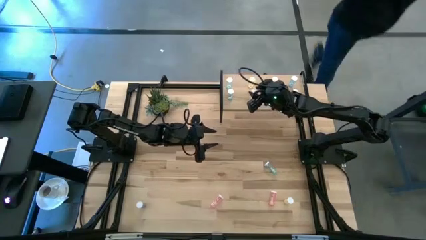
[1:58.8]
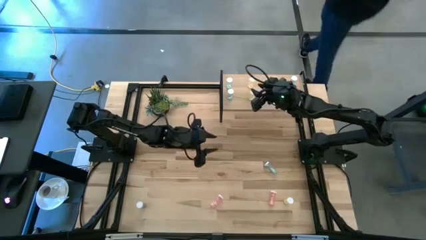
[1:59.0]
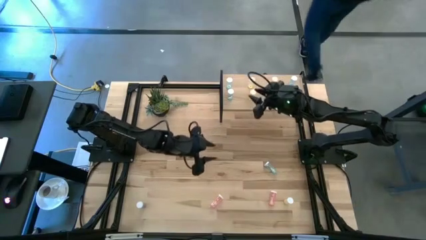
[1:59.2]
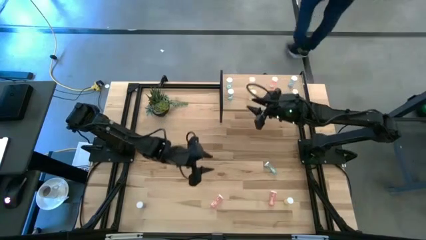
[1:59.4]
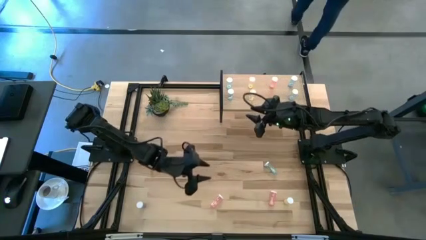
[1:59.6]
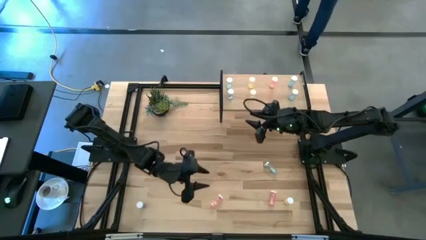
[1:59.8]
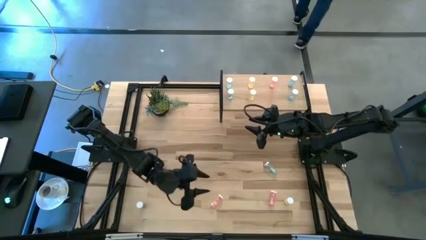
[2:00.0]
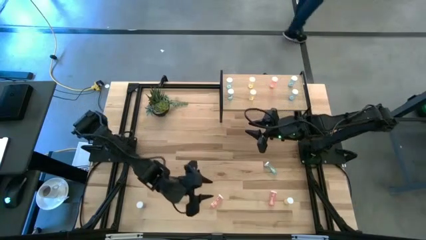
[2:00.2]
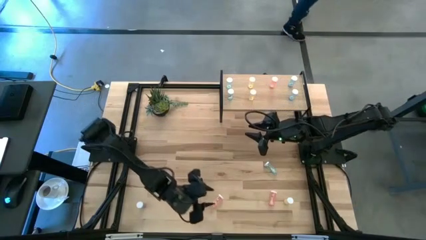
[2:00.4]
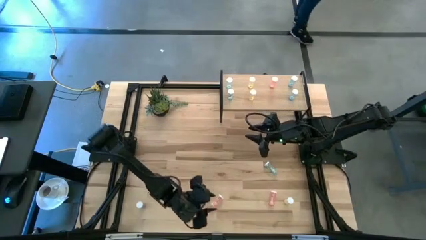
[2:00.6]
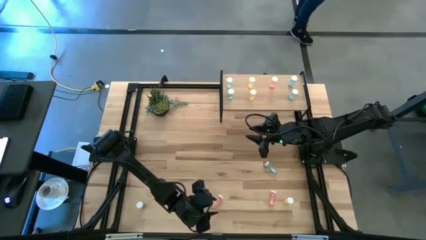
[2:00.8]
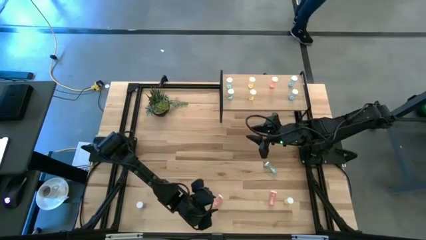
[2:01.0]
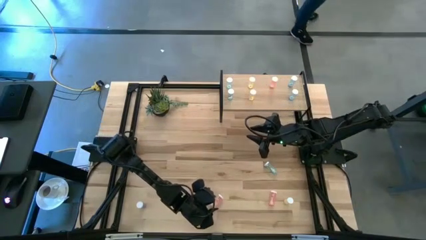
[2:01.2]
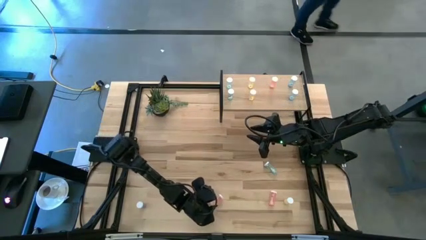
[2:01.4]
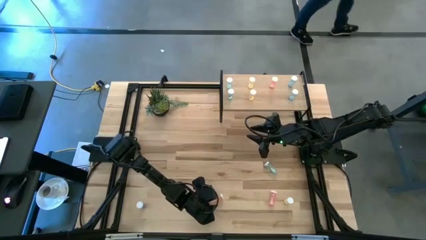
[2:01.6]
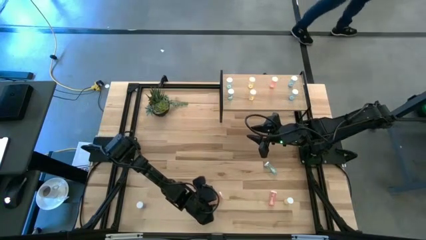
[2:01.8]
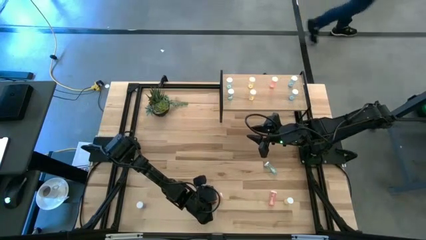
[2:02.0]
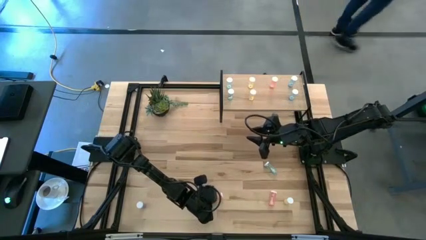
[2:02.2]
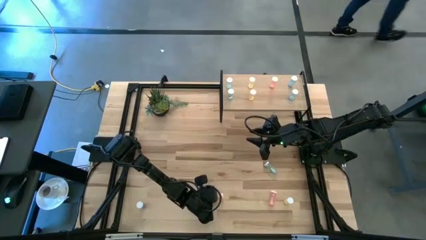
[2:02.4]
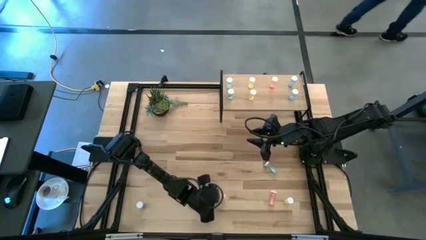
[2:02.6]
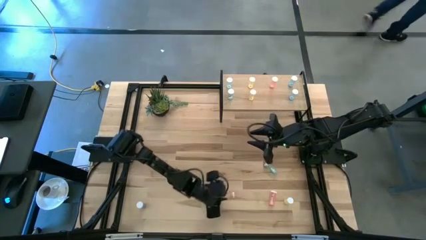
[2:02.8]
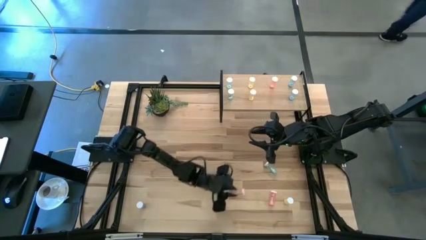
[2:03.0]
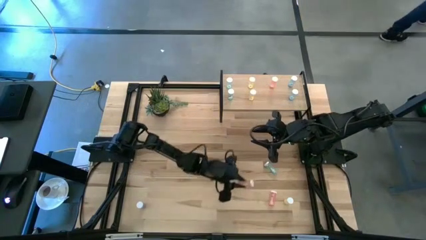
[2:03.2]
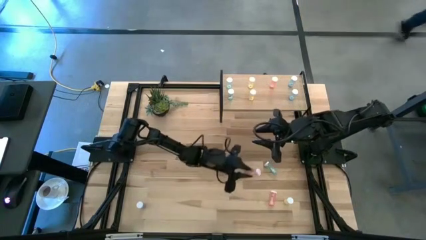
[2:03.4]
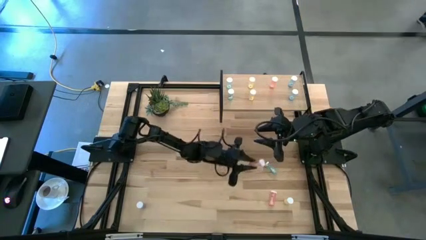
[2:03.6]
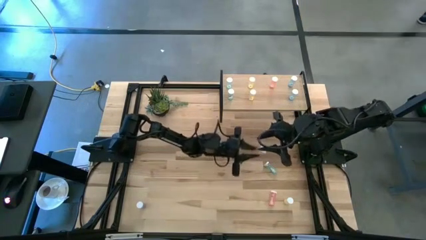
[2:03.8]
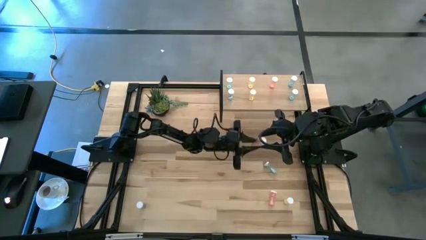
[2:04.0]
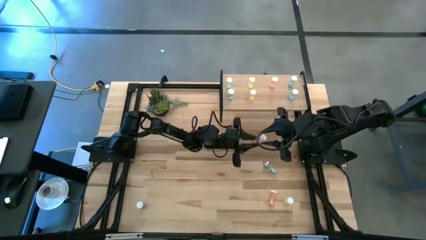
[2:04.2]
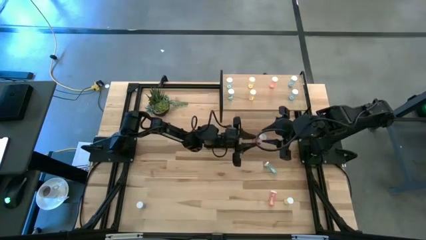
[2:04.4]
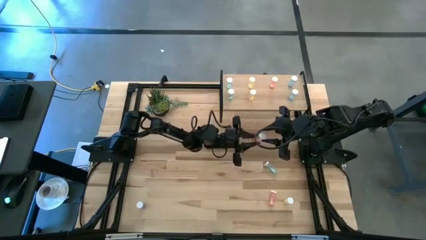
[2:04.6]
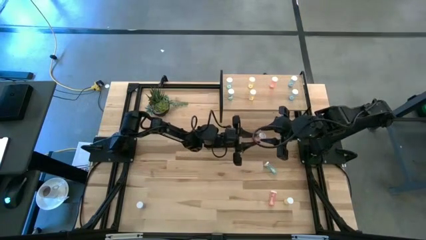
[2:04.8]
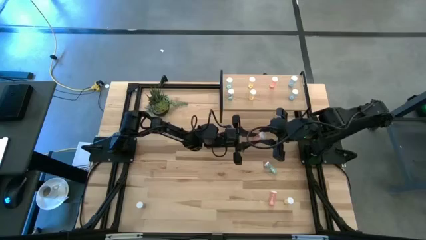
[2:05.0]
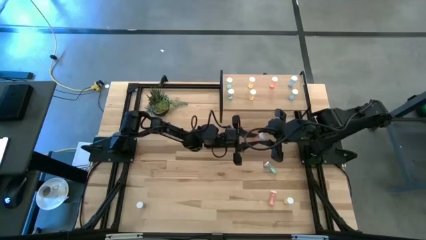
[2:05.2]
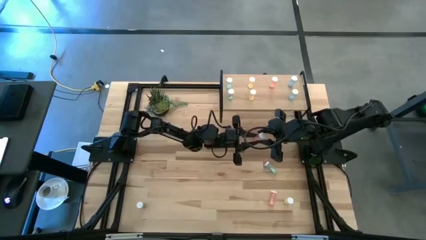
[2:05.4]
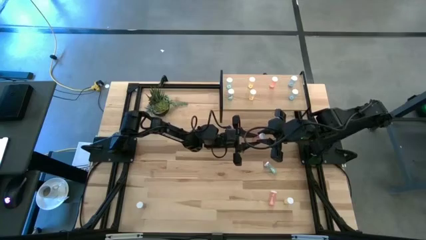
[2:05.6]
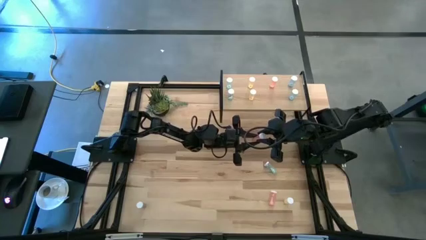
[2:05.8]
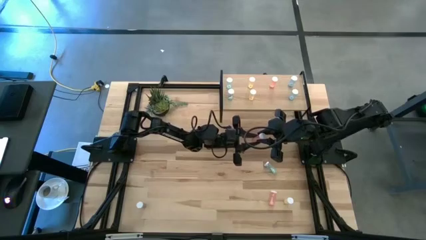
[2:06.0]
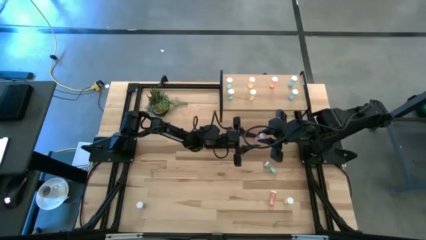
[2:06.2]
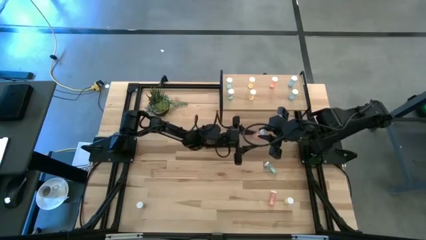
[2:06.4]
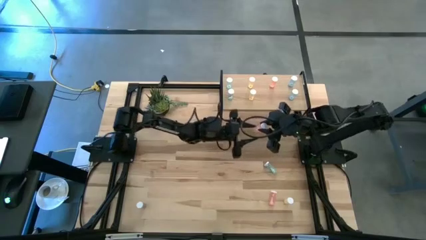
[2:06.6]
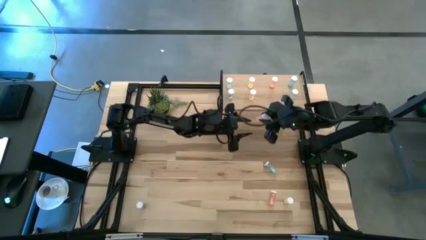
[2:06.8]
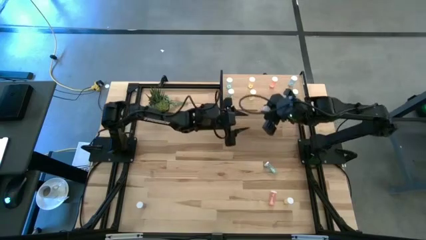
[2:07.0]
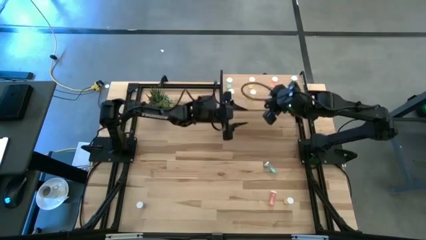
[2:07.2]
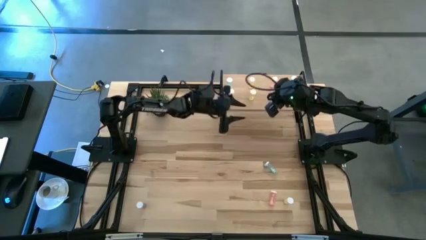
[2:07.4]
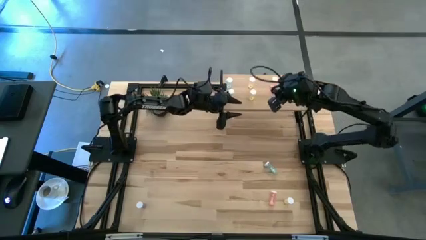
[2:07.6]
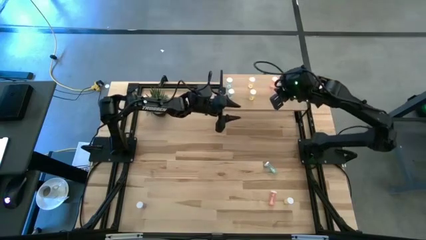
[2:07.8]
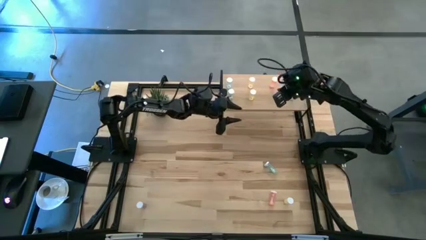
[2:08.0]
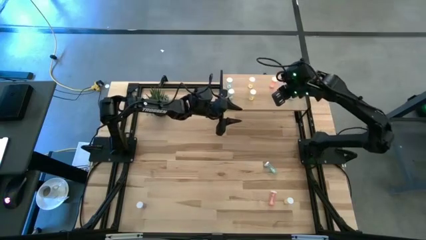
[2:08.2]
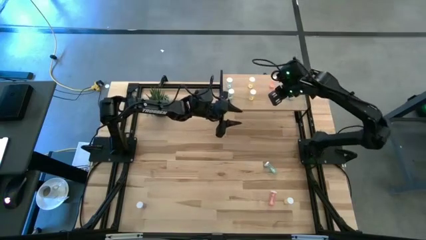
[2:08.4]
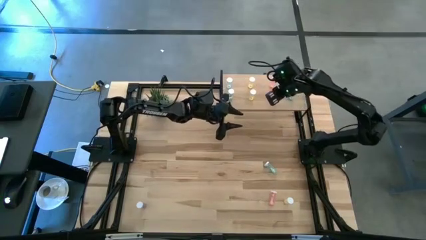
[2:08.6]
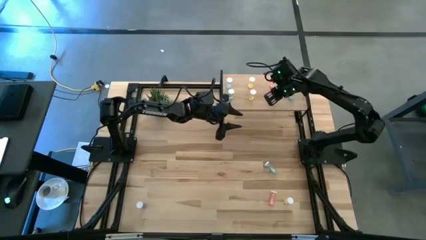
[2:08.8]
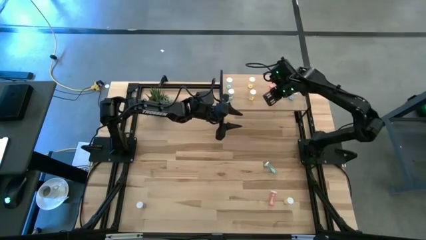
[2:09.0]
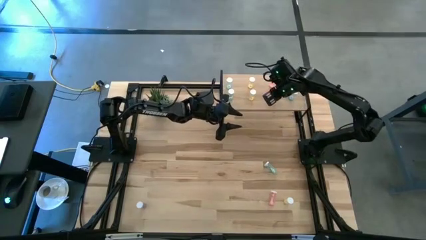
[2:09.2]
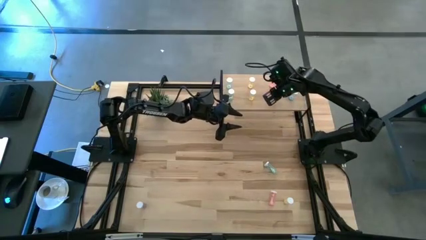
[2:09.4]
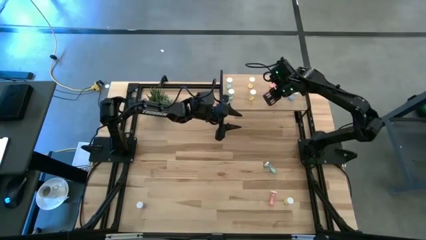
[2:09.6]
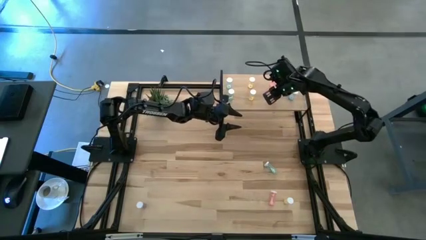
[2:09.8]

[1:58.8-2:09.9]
Task: Pick and place medicine bottles onto shelf by color
Put the pink pill bottle aligned with the other pink pill bottle on the shelf

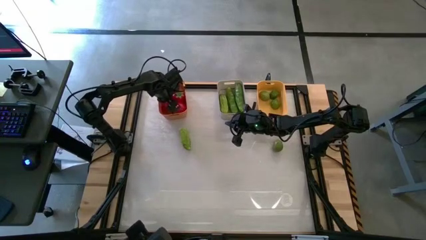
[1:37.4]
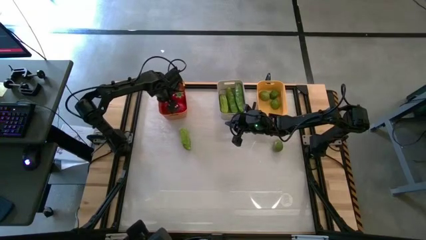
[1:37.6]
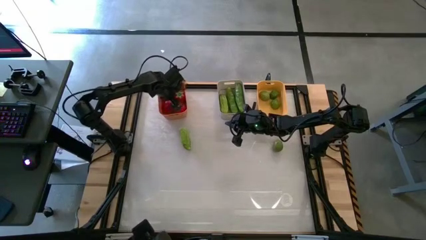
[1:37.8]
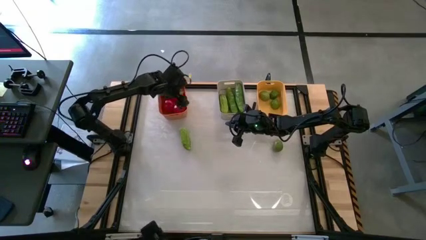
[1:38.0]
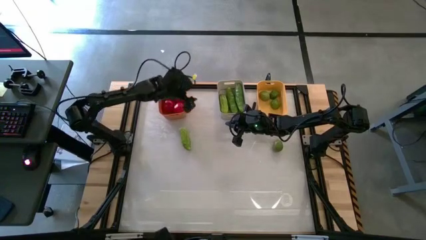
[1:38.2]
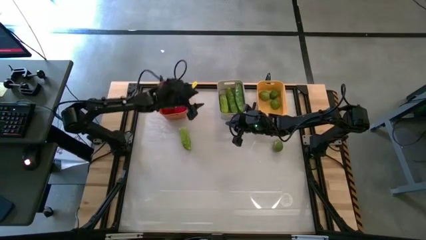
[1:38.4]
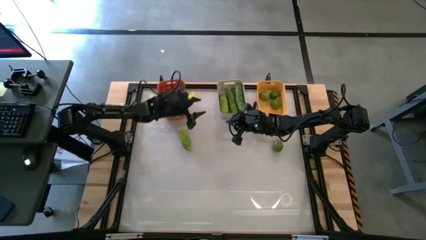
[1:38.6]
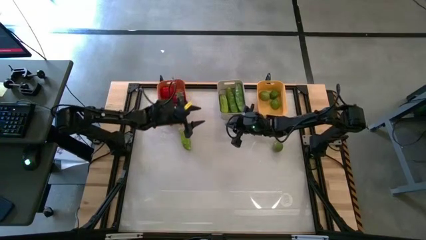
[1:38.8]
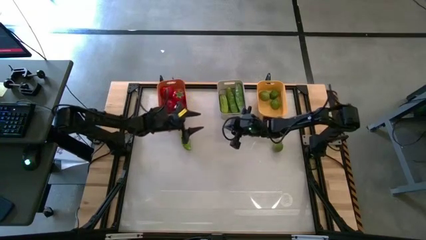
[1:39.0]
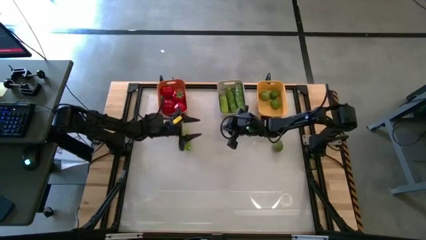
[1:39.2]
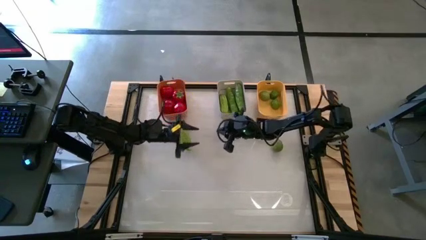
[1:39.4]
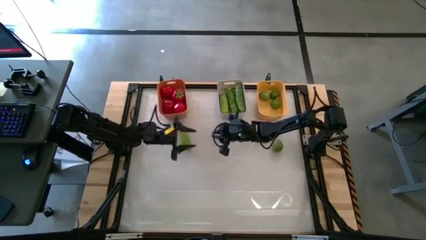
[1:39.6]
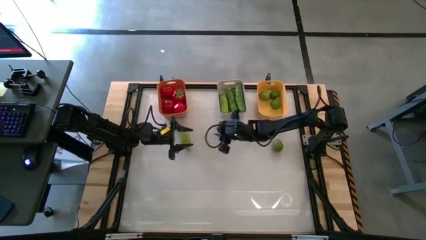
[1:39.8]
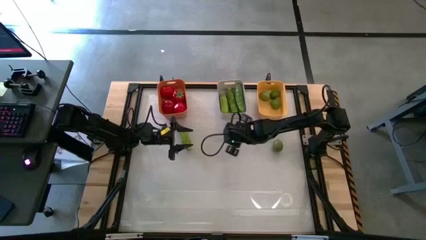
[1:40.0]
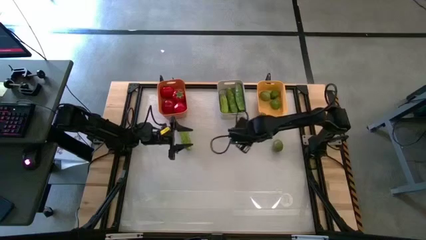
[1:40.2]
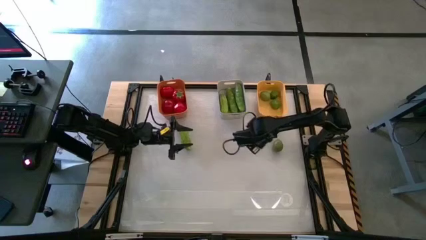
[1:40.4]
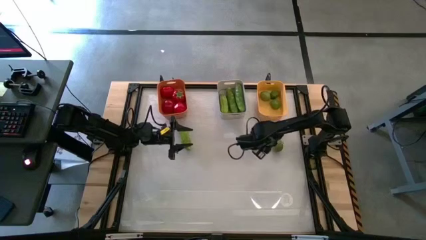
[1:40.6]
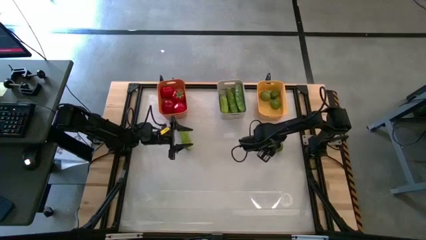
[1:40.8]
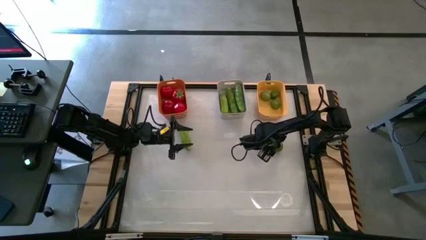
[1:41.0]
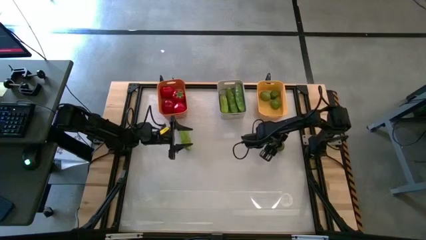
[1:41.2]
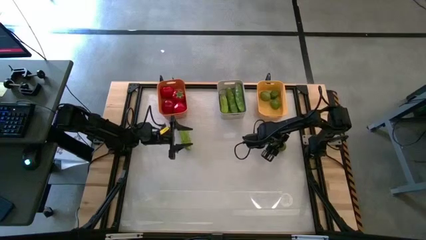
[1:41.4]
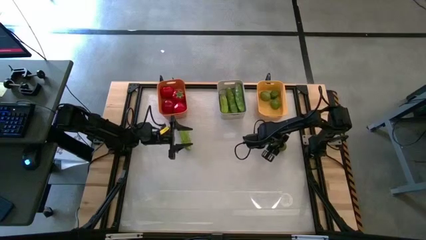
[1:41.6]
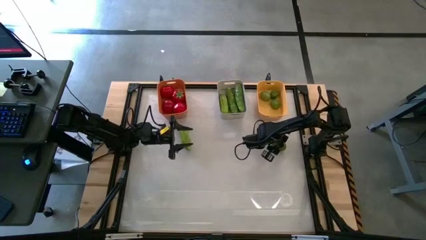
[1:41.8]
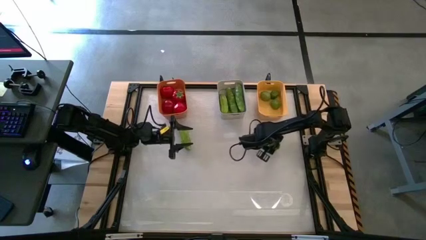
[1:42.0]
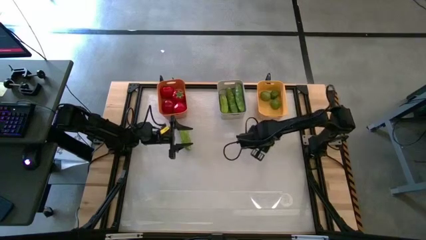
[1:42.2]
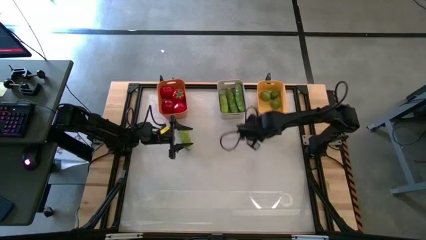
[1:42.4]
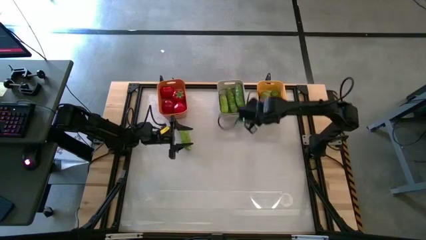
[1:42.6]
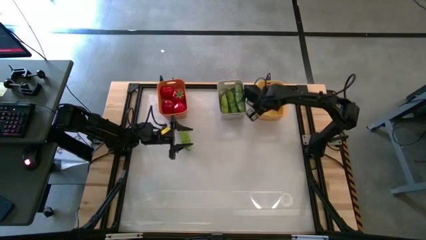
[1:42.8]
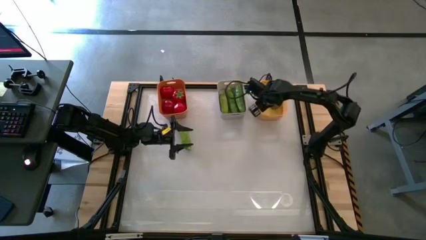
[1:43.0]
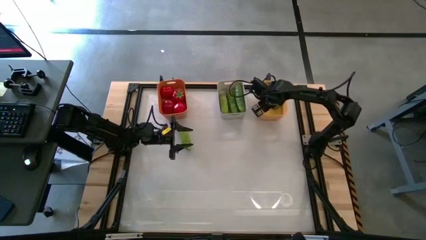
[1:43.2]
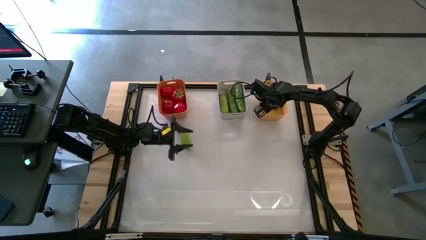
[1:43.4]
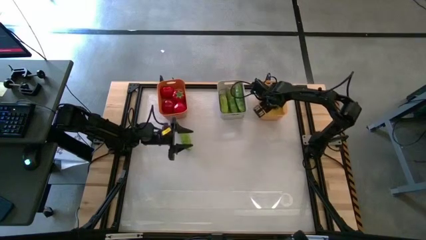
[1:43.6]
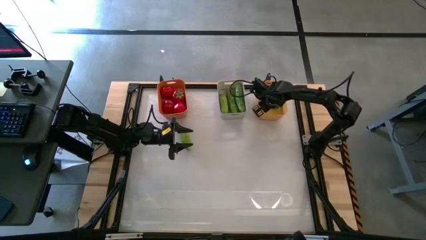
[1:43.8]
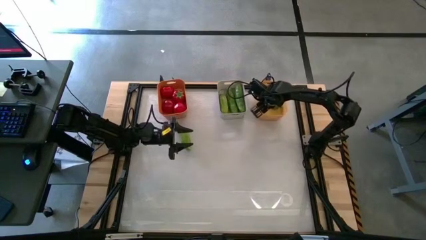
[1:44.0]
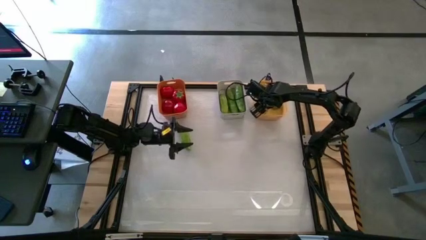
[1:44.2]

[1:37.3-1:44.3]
Task: Sort produce into baskets
Put the lime into the yellow bin
